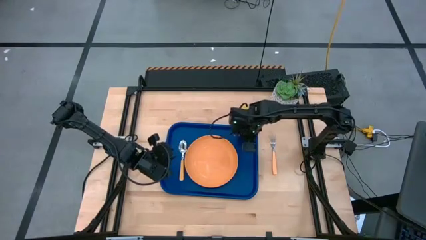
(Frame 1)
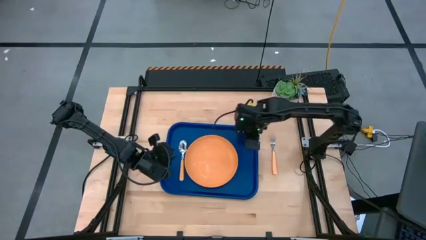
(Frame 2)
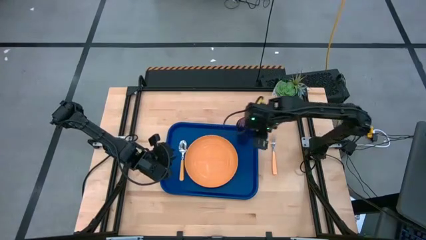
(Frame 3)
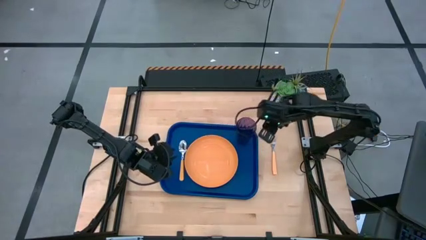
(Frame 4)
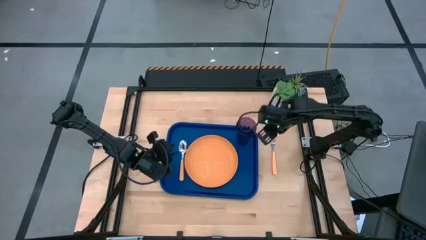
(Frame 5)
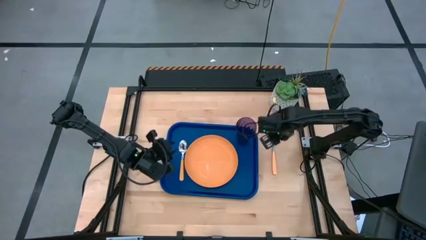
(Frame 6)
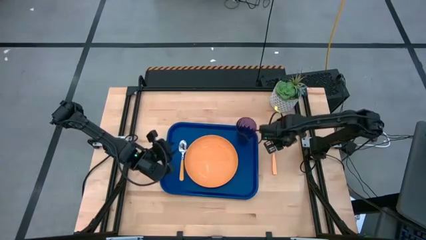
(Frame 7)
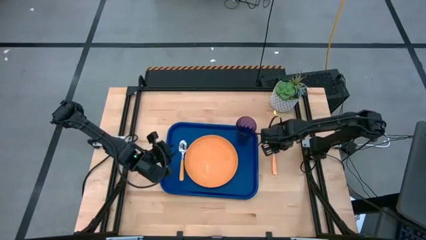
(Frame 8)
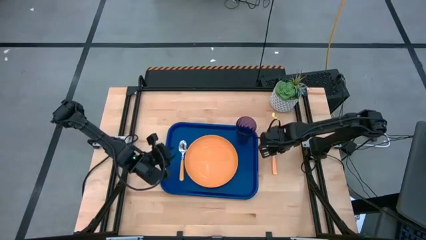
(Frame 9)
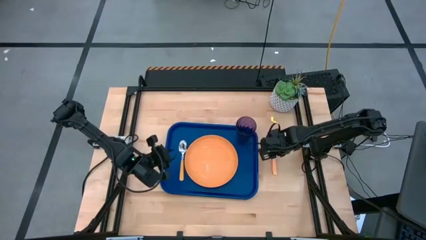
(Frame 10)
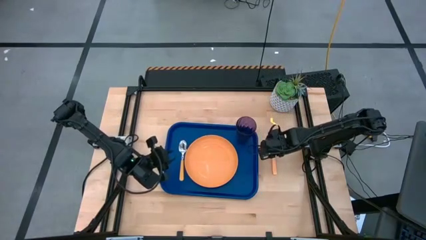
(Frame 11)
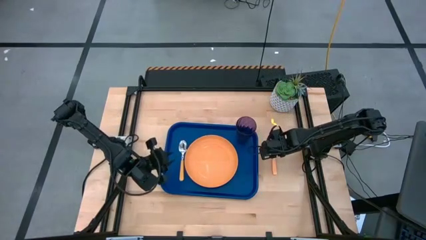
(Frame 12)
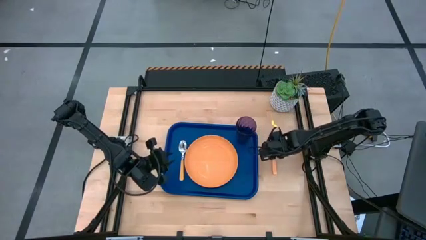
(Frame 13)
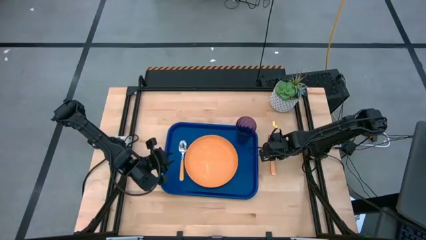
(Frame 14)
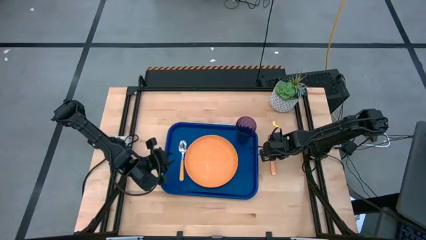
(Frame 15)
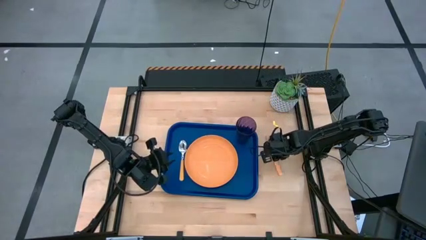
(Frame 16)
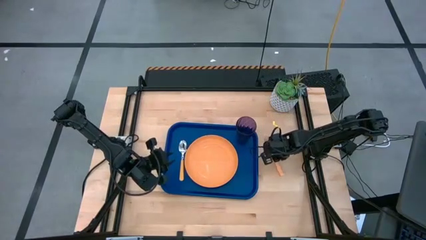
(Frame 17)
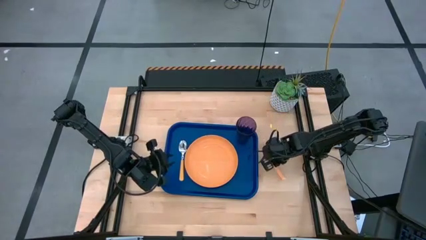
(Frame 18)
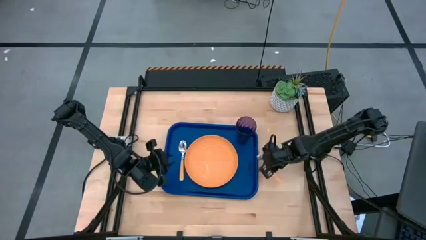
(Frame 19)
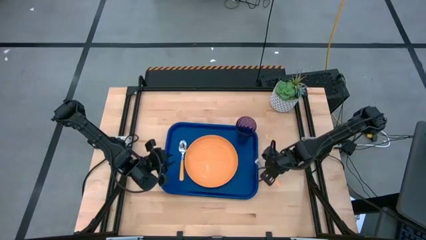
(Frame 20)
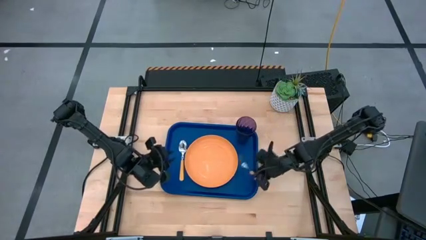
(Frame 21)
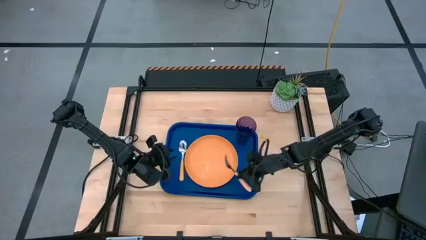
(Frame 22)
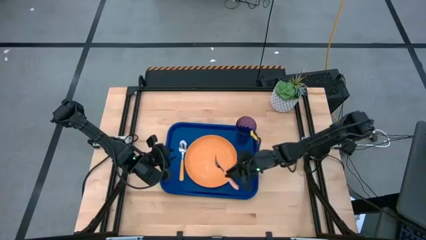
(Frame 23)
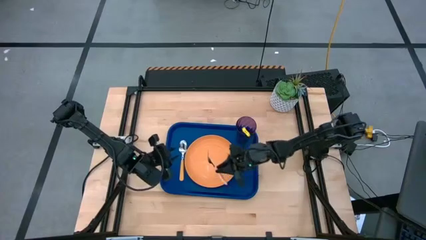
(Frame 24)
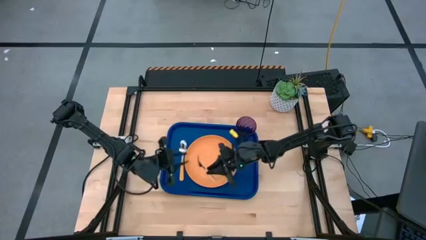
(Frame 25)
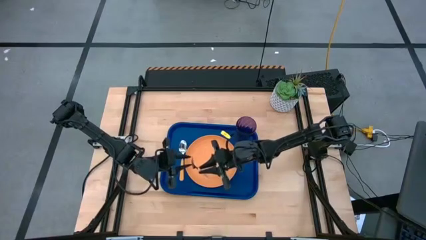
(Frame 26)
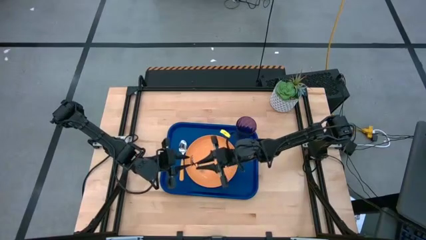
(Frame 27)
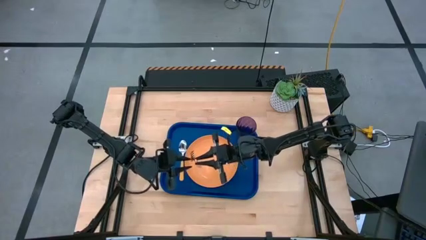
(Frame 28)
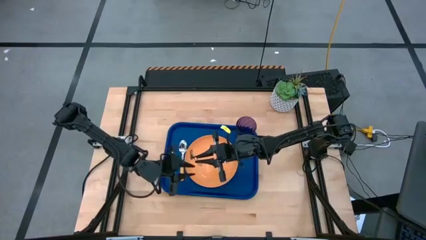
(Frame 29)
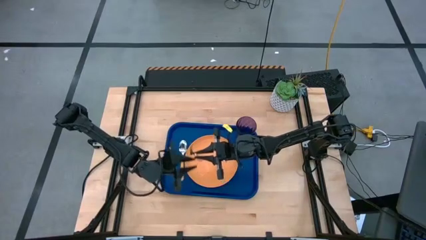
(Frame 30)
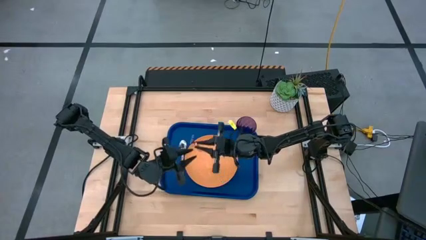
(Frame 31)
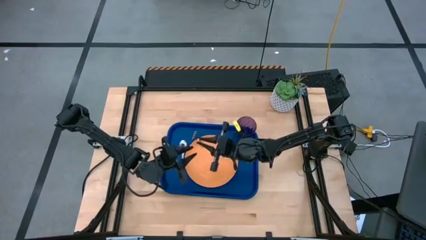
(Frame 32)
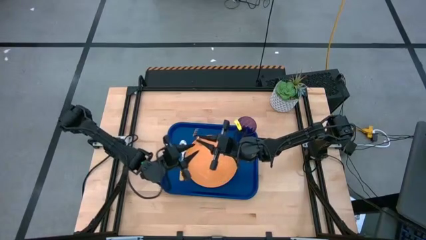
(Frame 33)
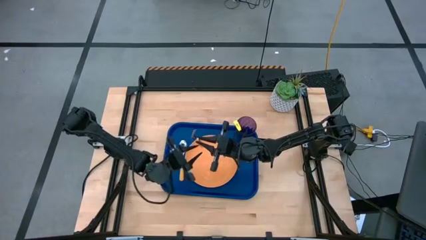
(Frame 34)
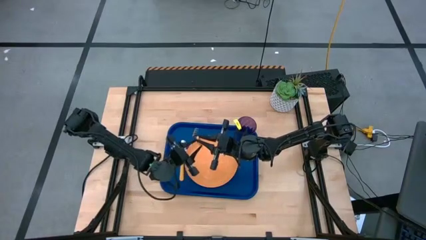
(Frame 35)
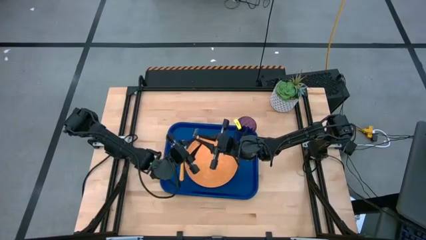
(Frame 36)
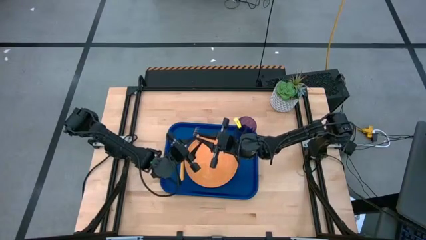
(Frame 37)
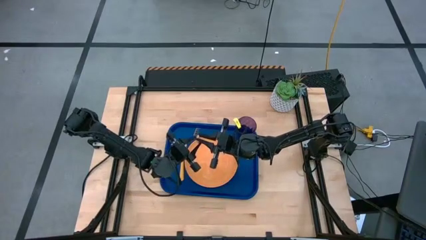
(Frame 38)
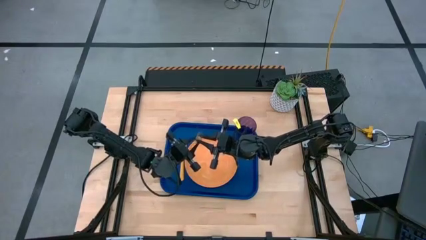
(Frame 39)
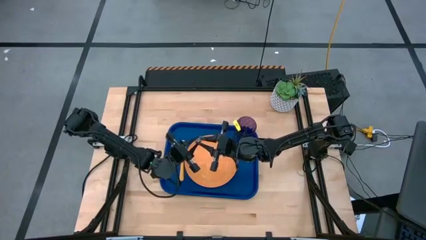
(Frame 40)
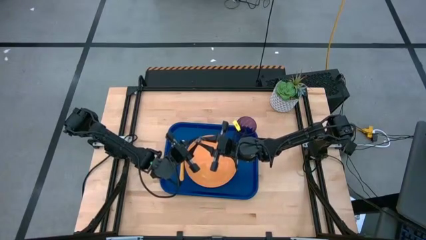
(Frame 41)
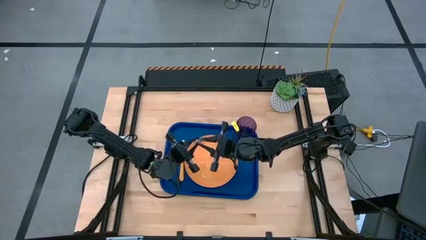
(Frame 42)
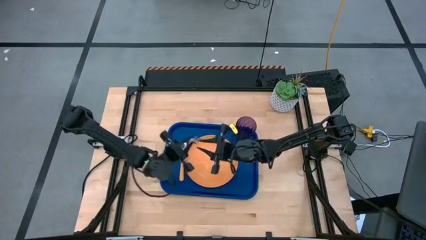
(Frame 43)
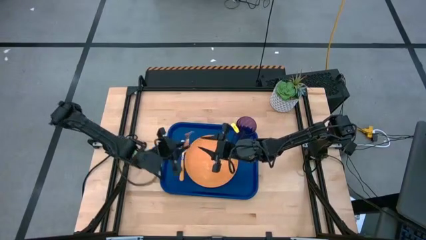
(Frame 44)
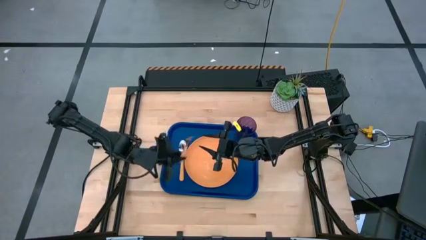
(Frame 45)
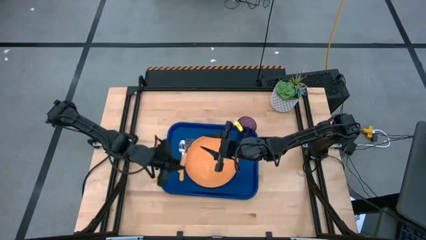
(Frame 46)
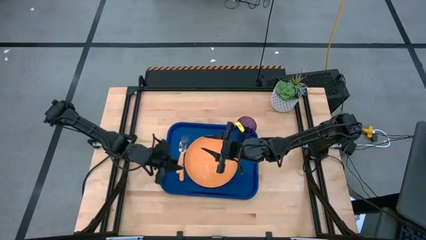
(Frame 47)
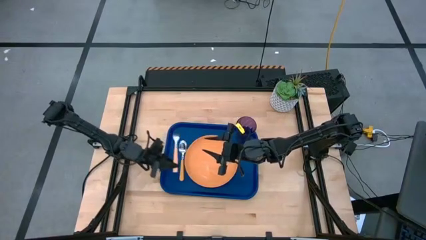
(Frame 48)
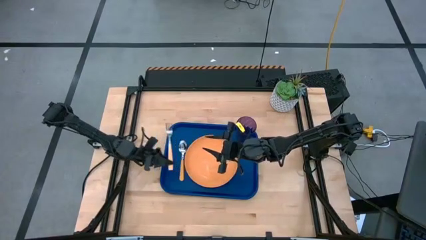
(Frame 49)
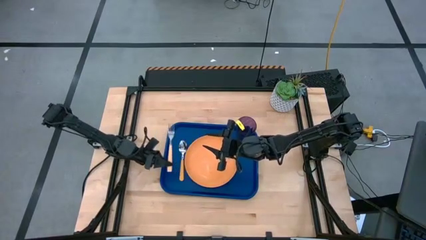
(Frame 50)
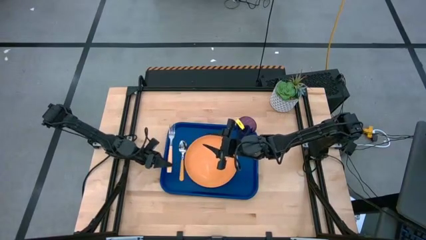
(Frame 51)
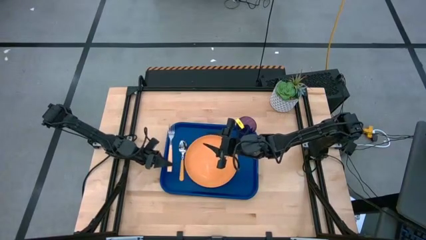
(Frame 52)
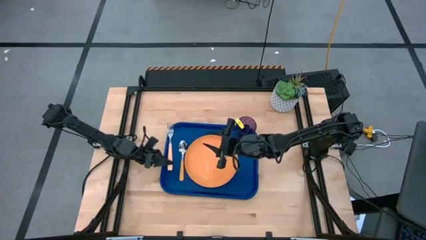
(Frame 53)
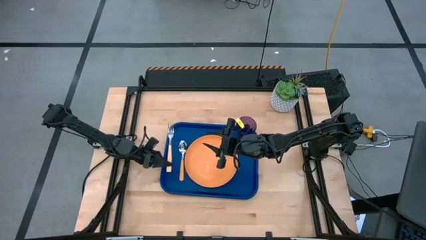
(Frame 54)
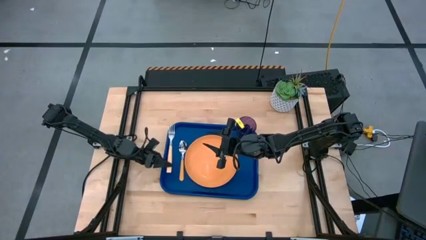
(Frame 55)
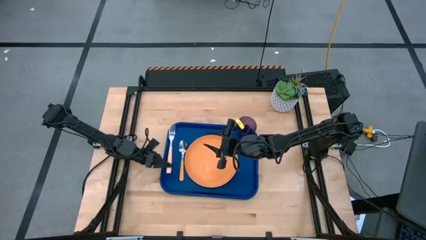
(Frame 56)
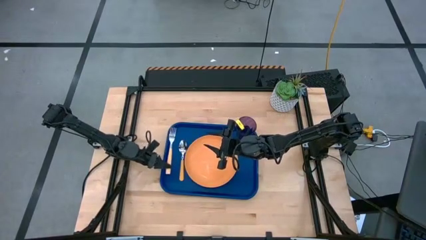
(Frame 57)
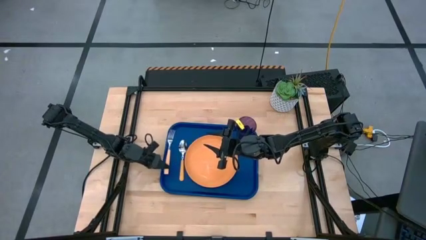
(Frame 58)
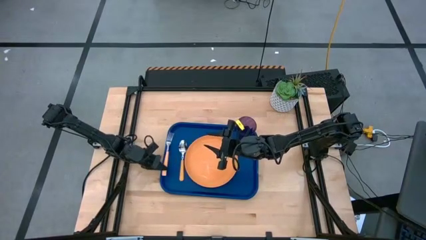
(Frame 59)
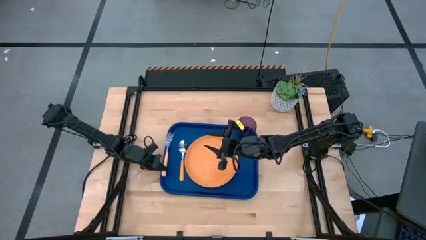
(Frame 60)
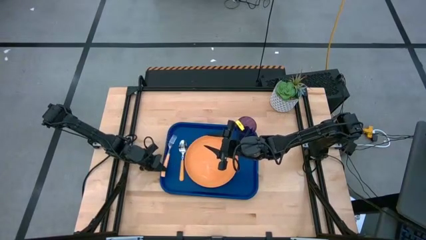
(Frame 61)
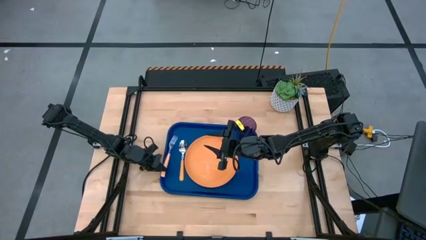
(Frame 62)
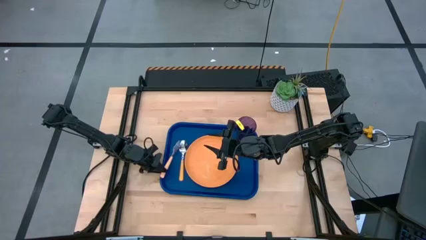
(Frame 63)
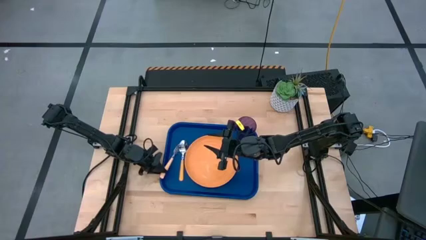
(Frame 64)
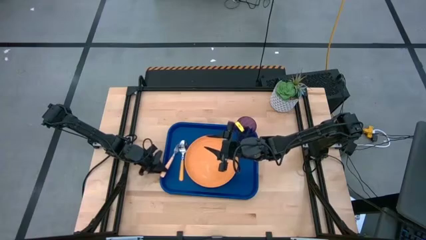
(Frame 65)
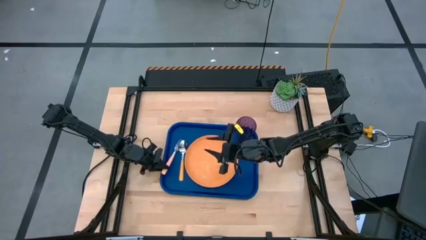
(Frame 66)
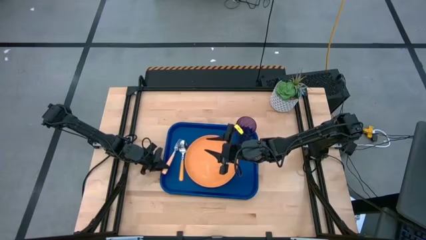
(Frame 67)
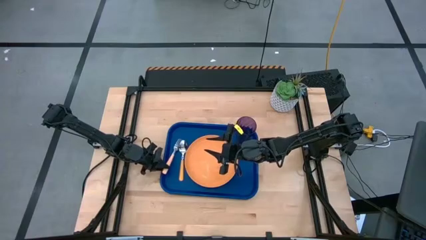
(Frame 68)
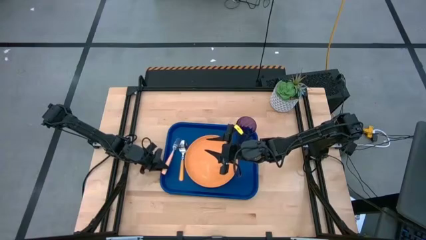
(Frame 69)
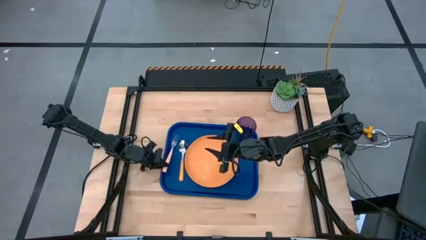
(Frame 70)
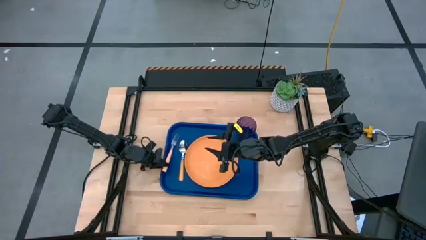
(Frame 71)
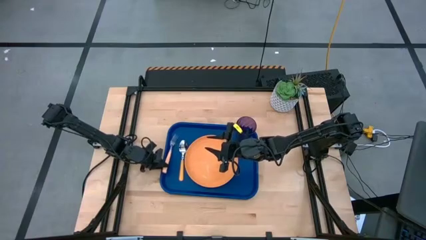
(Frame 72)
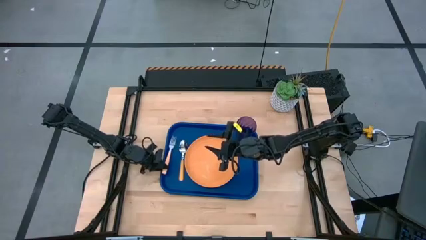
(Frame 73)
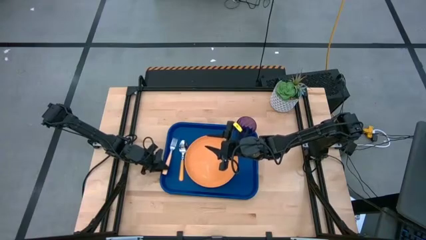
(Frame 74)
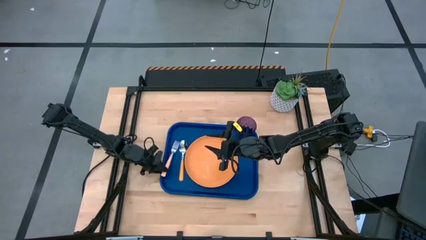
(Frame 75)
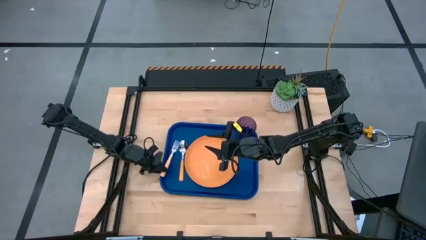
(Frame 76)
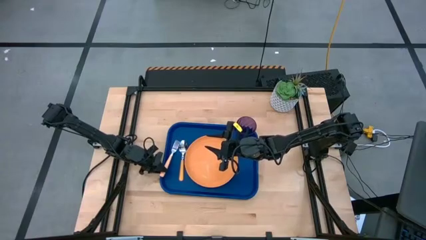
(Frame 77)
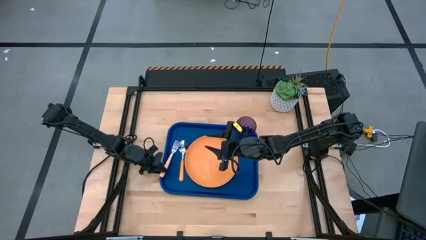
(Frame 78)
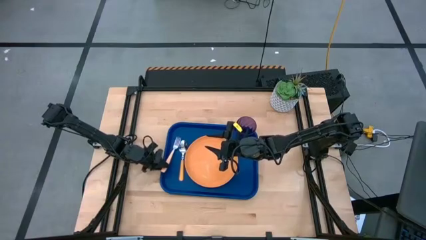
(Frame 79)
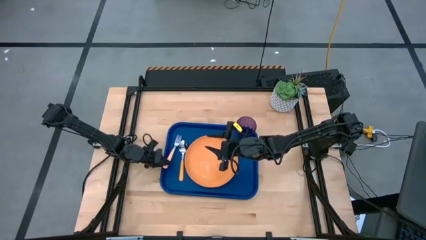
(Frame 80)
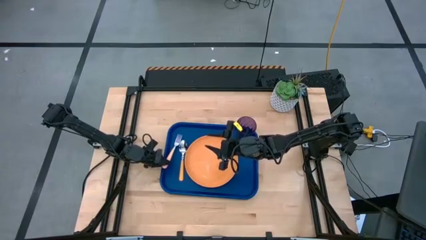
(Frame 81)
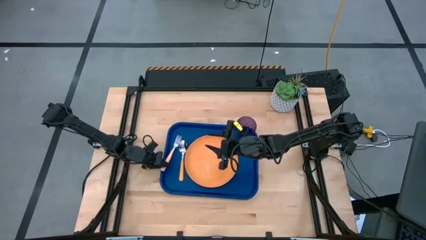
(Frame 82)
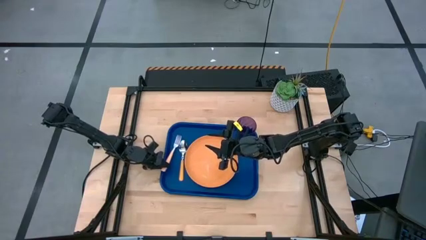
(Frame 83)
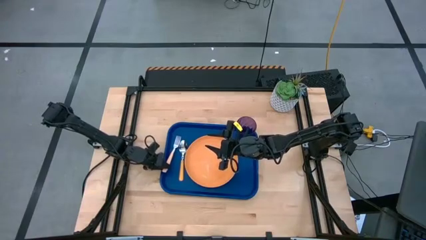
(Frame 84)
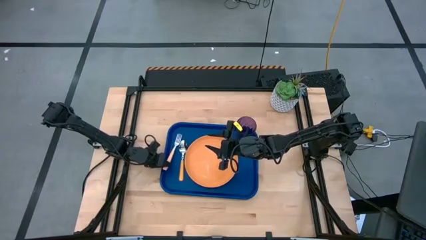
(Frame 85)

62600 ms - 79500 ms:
Task: Pick and place plate/cup/fork/spoon on tray
Put the orange fork on the blue serving tray to the left of the yellow spoon
